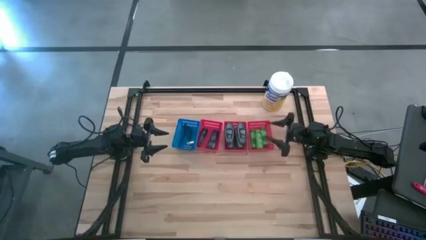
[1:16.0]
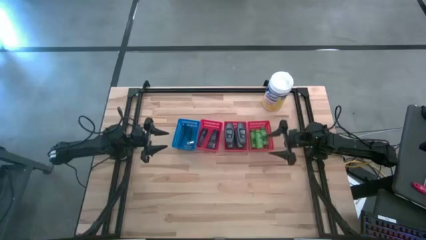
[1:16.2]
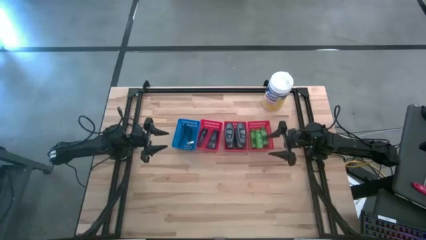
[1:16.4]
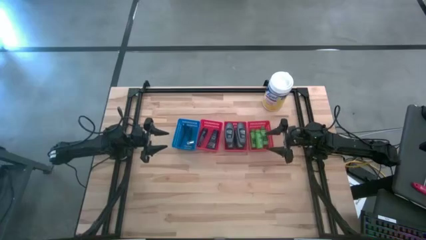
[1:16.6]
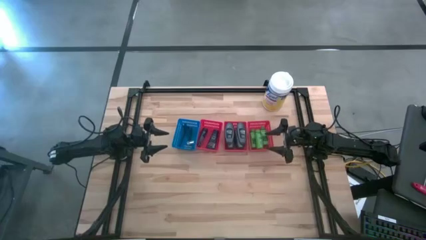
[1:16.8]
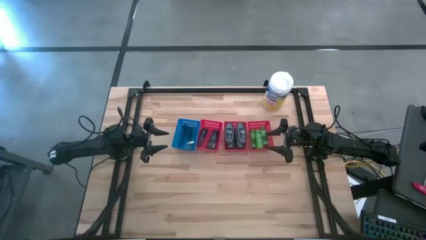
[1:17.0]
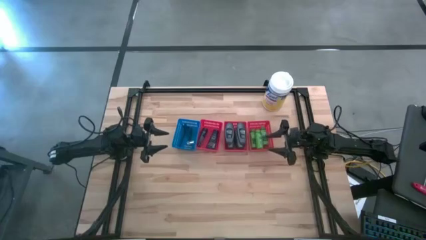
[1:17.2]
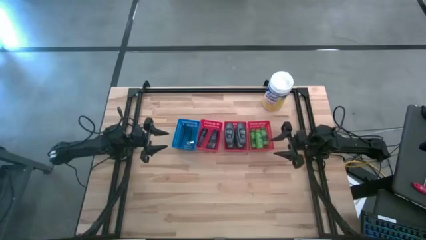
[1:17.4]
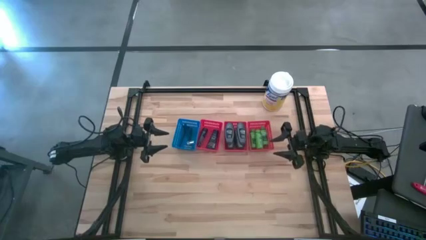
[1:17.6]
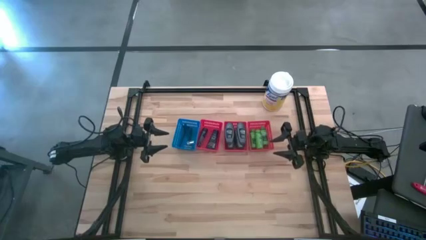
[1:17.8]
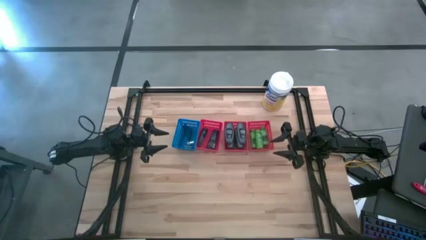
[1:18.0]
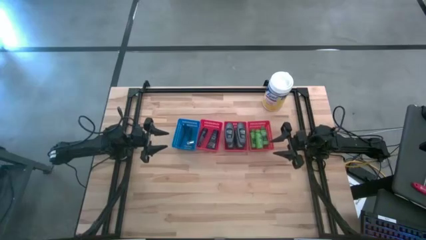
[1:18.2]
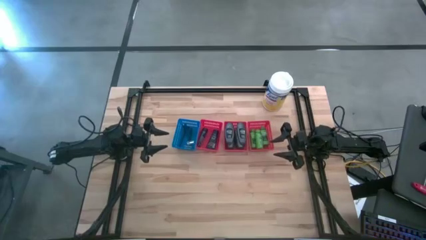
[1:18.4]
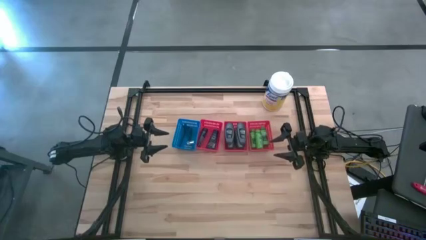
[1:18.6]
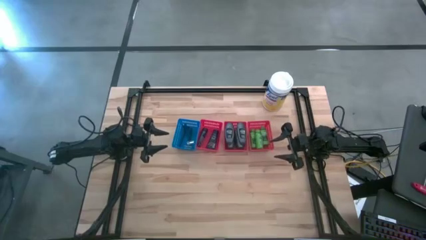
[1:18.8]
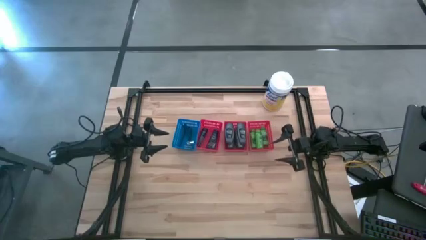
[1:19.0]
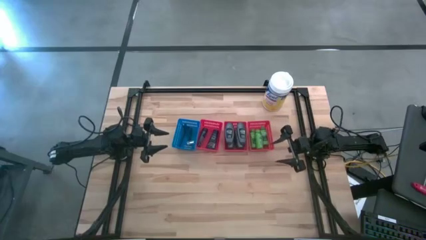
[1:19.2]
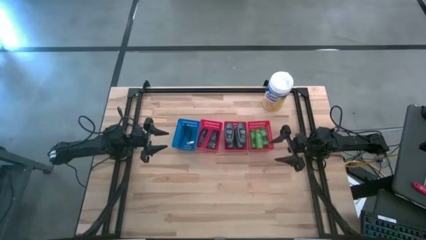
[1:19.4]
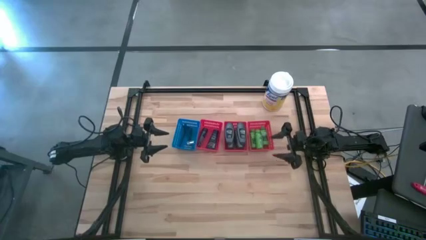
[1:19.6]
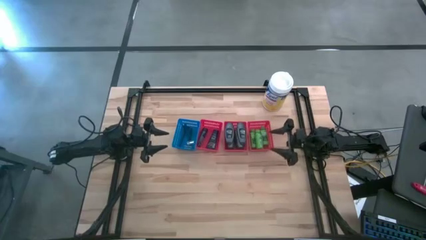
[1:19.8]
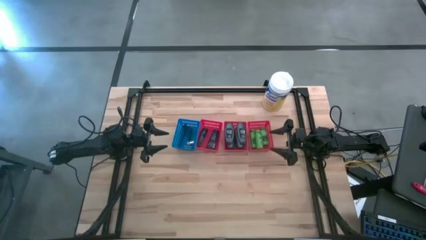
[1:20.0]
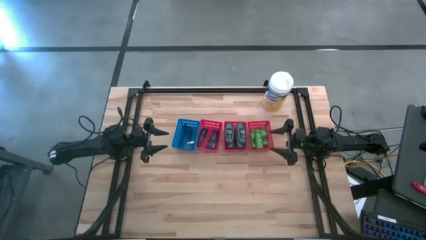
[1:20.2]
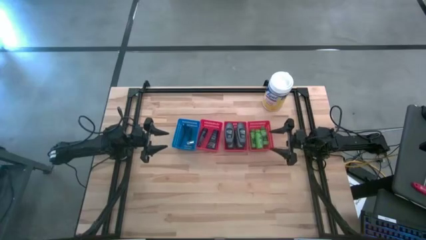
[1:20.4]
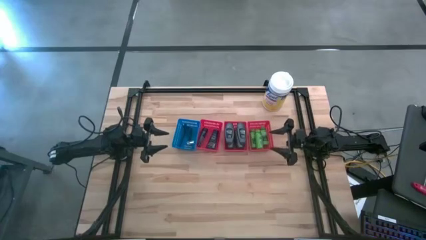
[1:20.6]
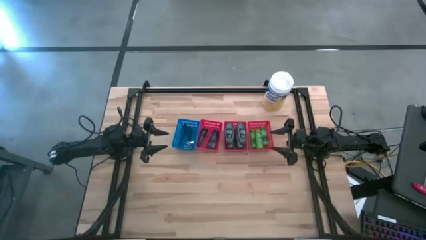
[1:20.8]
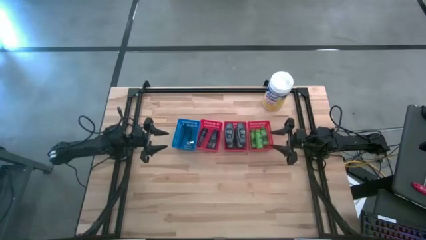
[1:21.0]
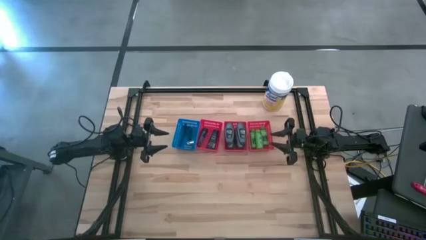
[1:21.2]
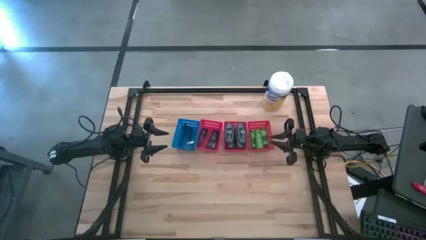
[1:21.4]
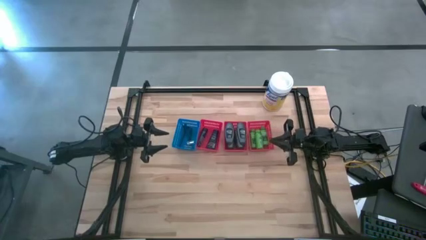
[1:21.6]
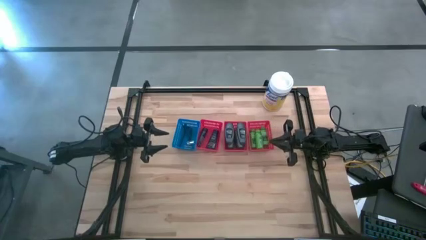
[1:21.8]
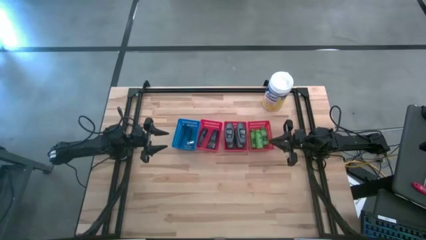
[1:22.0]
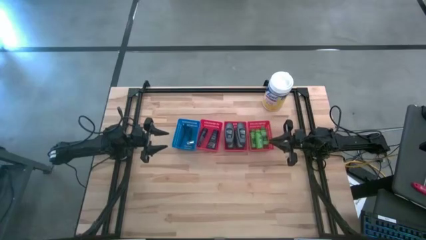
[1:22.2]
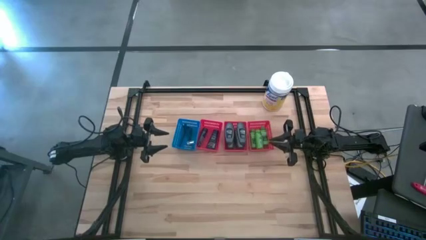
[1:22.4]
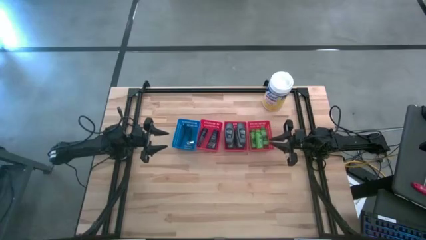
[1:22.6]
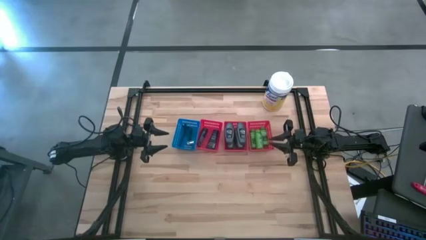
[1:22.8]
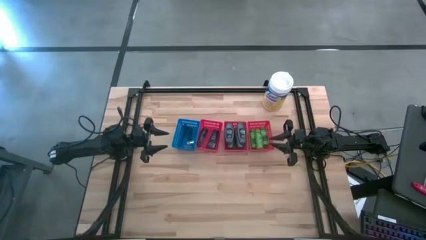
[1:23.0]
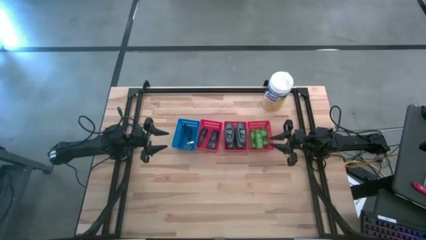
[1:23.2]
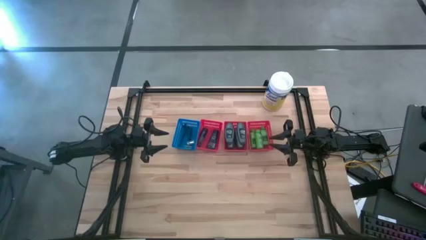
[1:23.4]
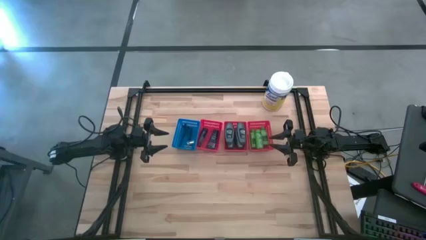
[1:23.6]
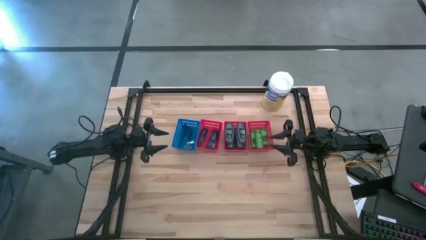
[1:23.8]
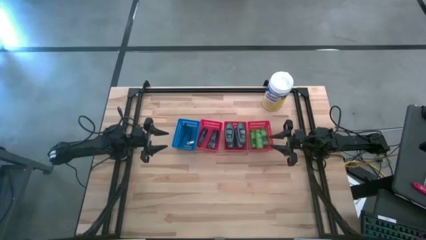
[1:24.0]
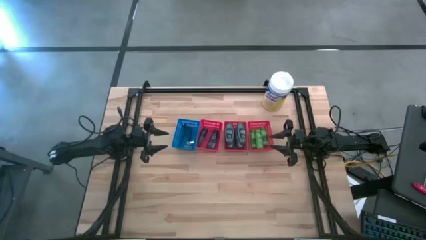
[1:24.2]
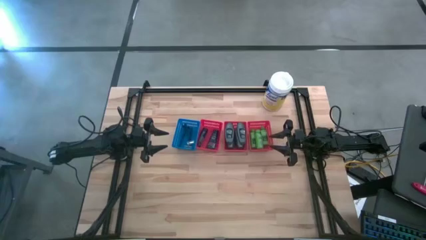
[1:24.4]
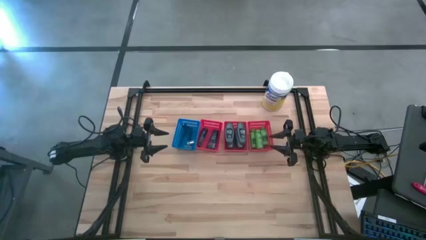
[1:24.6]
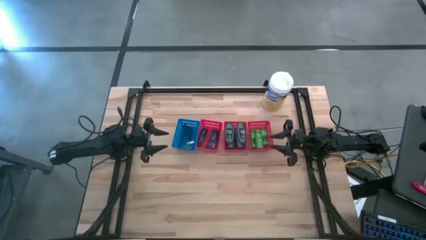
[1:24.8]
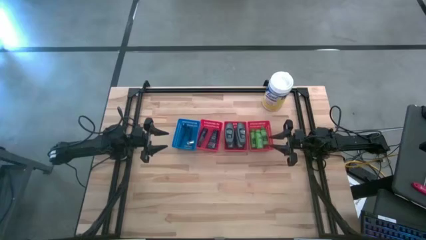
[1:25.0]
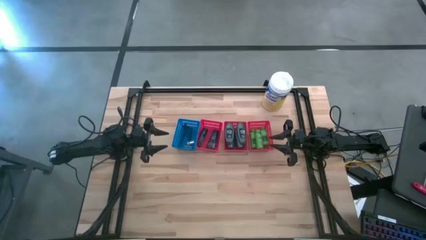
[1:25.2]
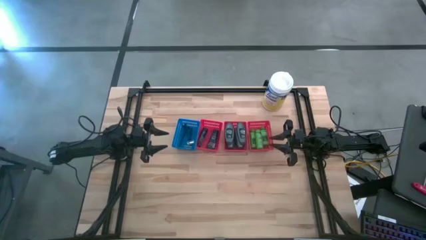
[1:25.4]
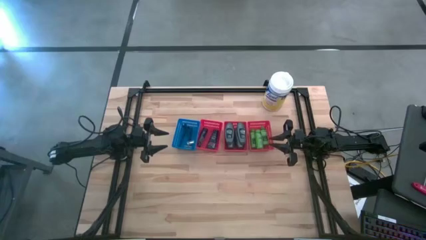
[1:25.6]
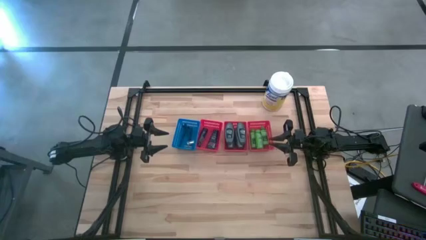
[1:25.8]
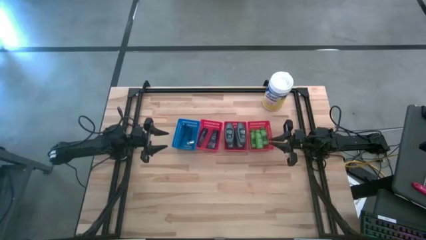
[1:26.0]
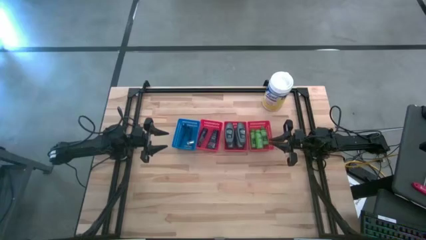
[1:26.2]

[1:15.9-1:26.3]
Task: Pick & Place Travel size toiletries
Return to Home Position

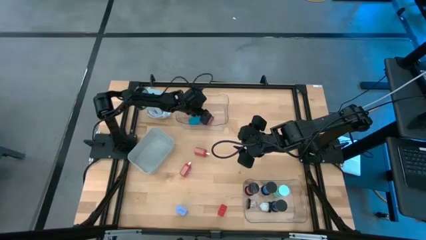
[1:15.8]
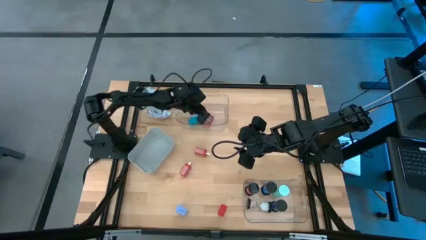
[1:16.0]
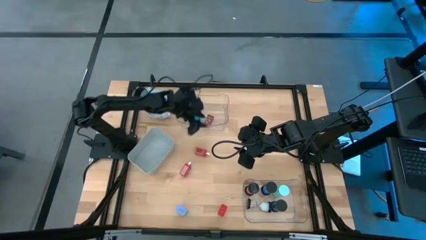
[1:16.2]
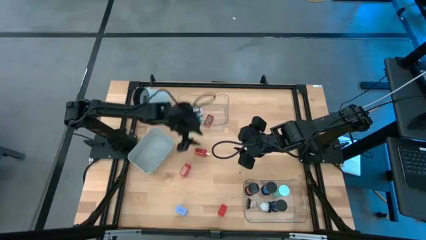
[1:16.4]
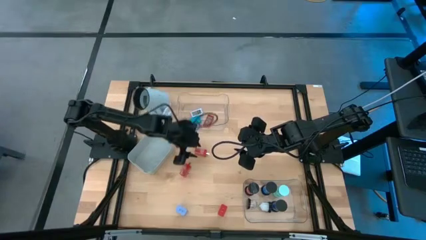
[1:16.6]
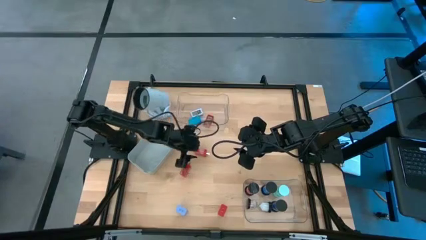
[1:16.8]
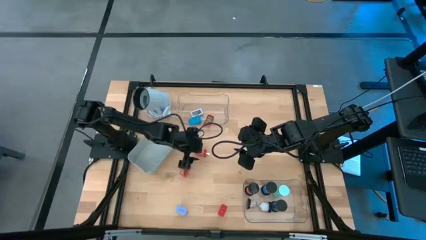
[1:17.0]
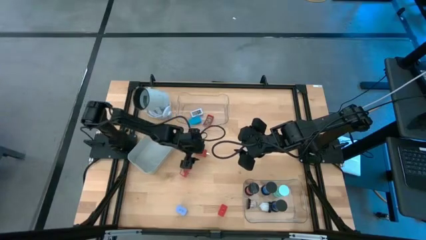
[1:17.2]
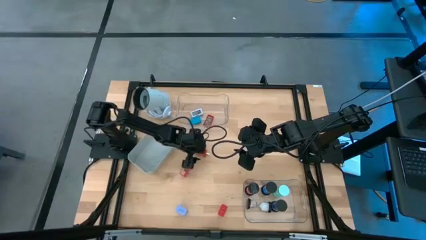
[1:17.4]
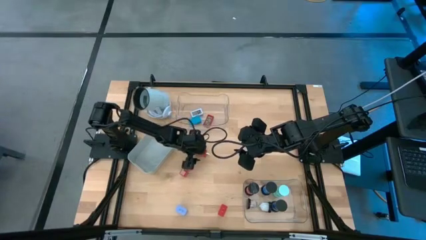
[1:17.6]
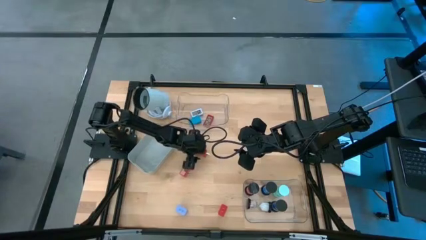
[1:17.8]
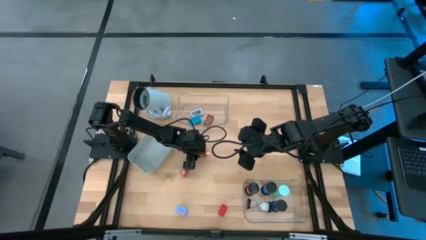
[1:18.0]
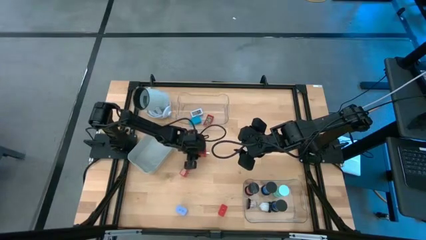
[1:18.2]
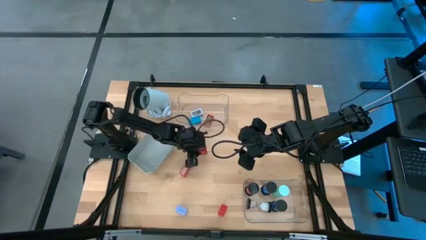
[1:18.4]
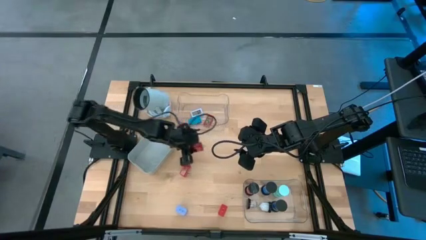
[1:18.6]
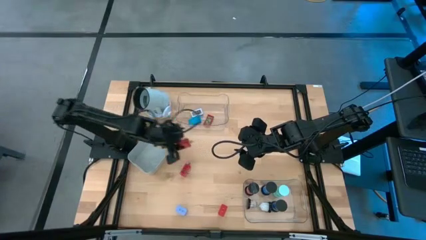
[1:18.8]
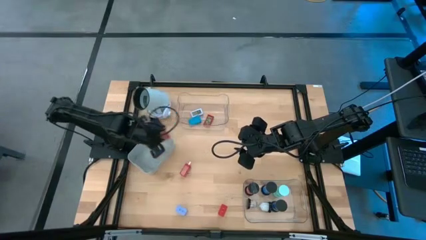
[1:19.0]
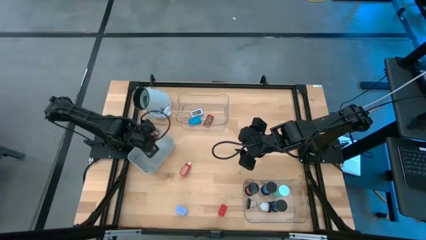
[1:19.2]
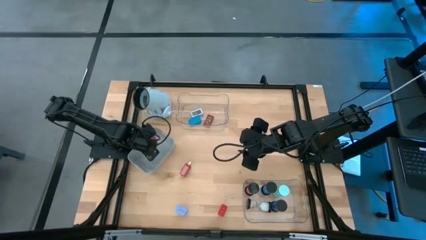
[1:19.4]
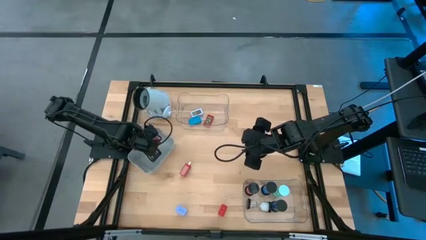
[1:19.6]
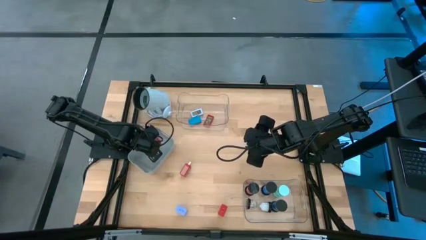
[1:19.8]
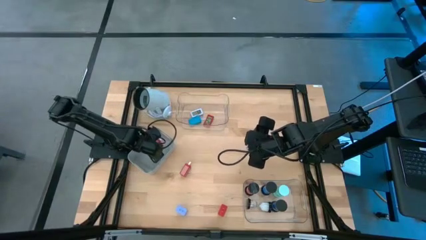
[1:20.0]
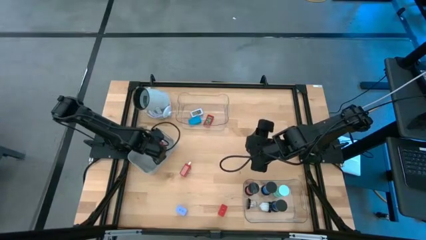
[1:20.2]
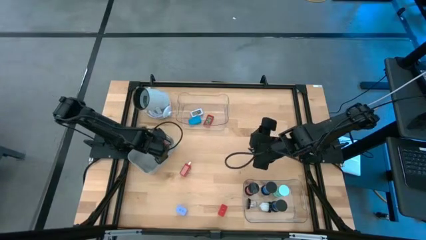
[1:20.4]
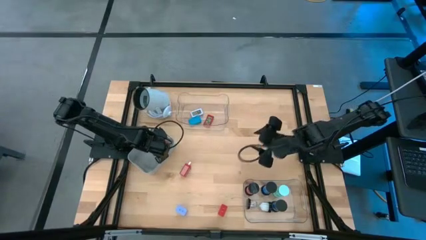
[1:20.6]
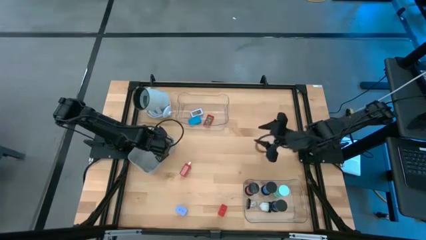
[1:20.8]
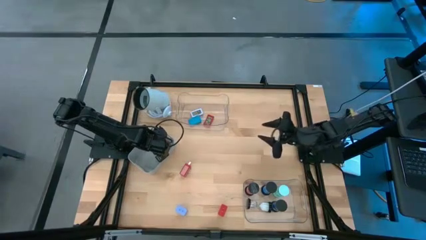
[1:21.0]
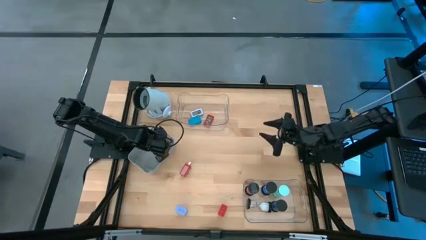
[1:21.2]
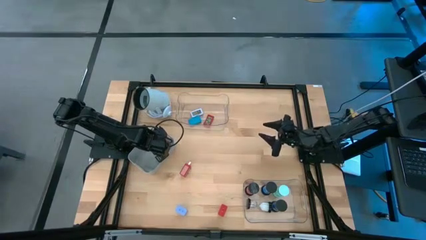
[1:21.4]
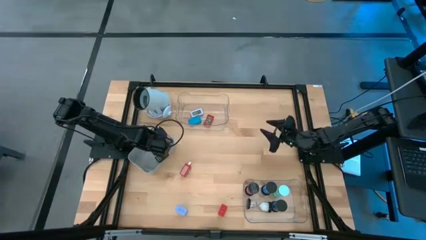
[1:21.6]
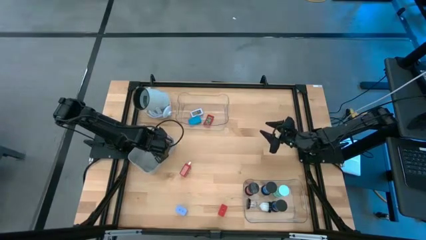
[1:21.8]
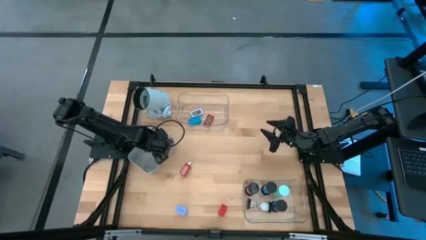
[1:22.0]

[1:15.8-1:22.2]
Task: Pick & Place Office items
Put the top orange charger adapter into the gray bin
